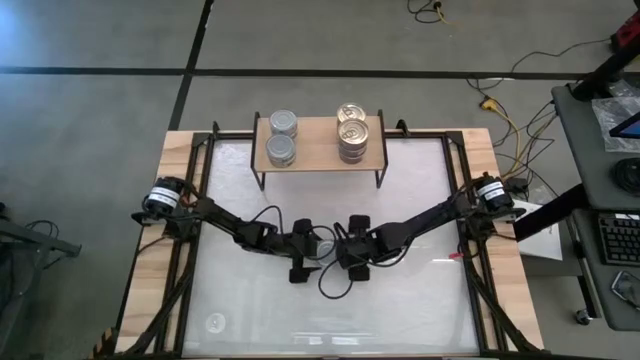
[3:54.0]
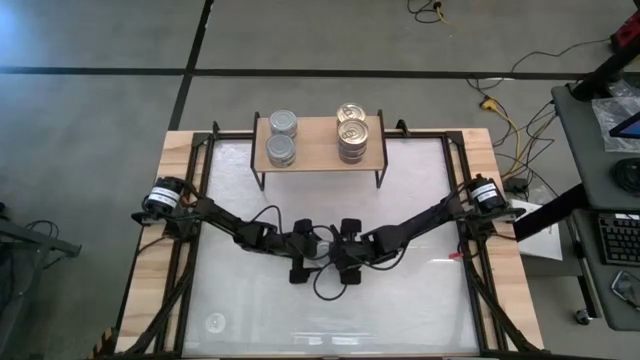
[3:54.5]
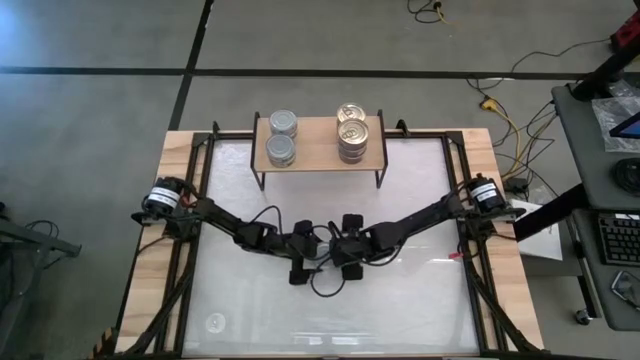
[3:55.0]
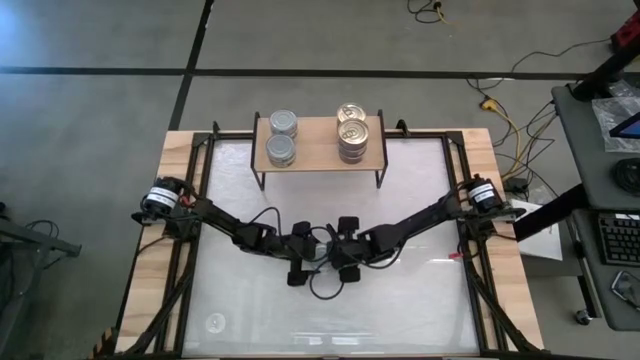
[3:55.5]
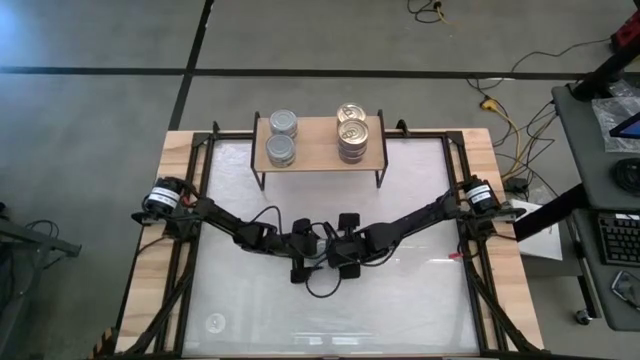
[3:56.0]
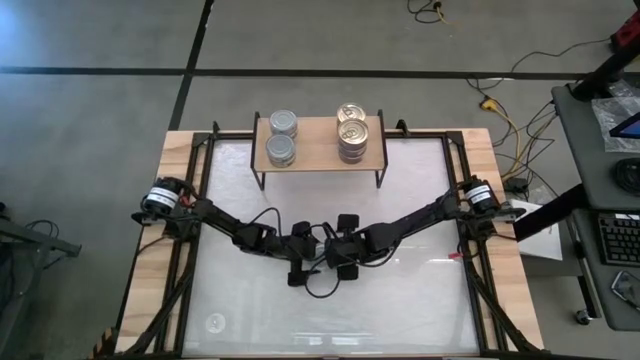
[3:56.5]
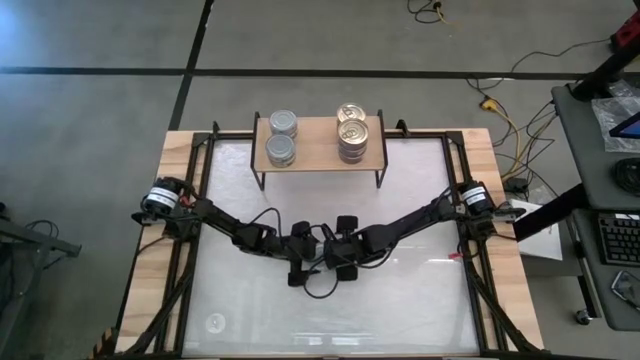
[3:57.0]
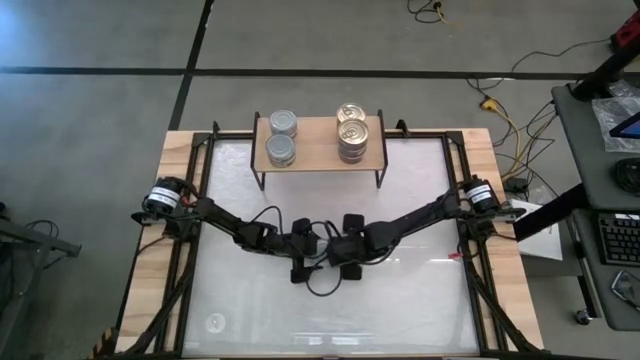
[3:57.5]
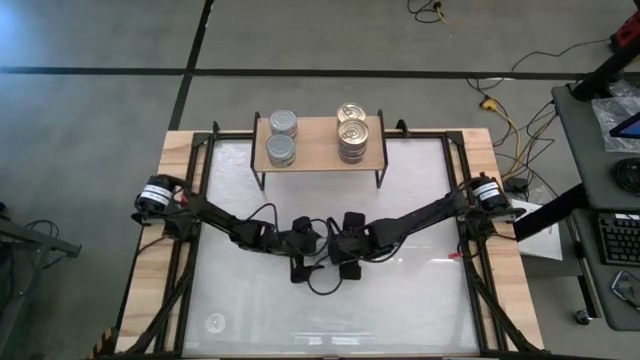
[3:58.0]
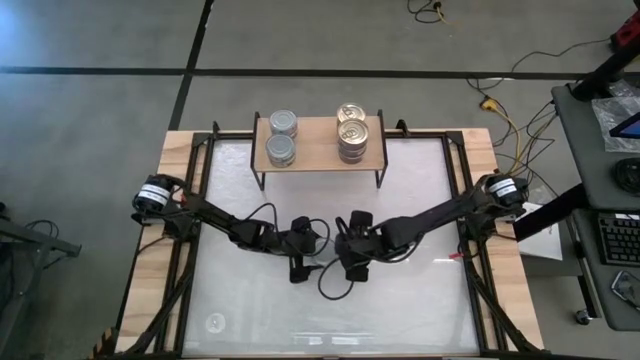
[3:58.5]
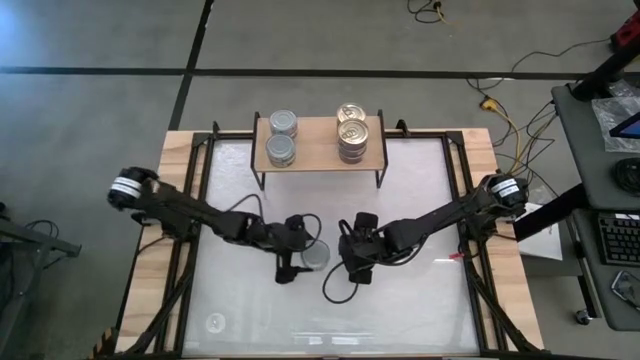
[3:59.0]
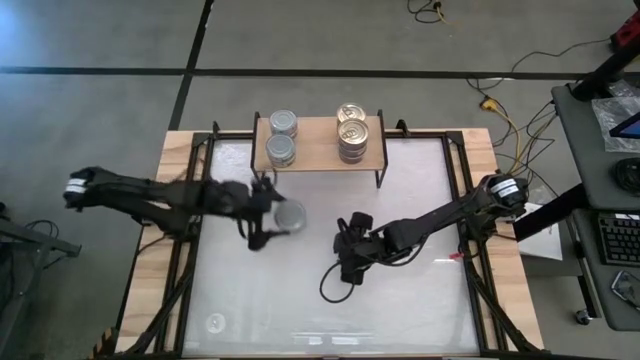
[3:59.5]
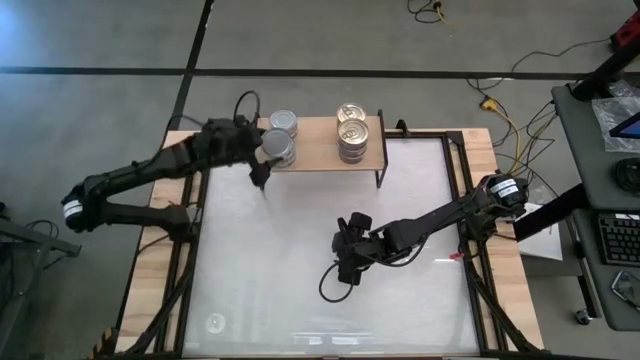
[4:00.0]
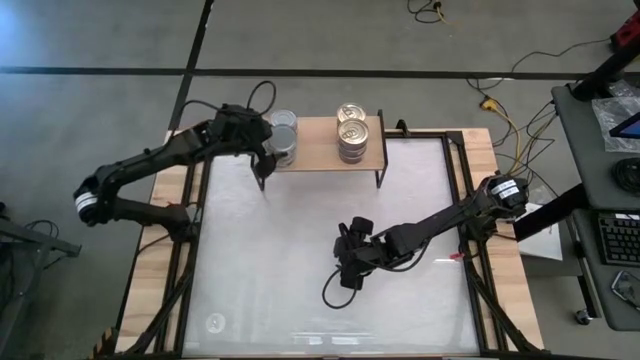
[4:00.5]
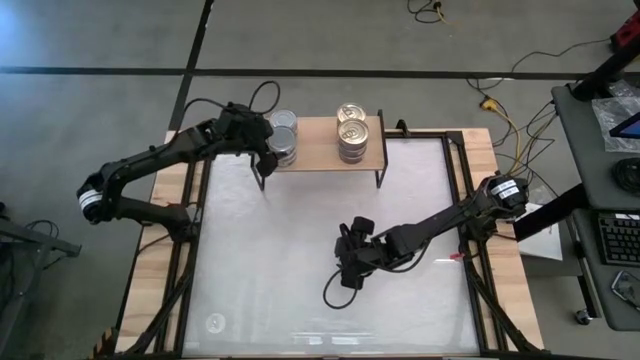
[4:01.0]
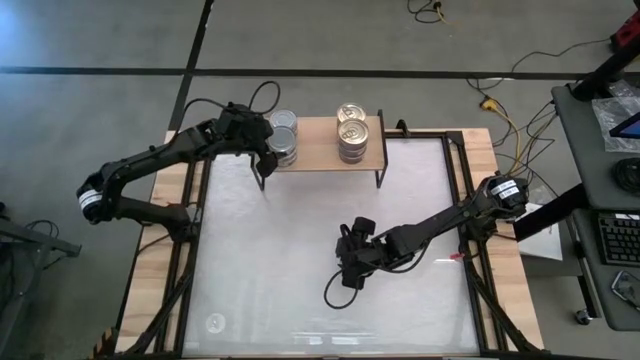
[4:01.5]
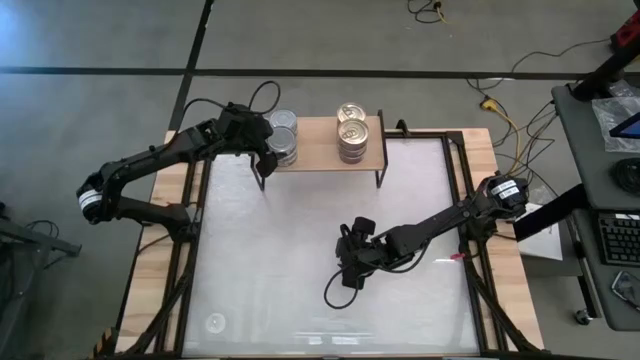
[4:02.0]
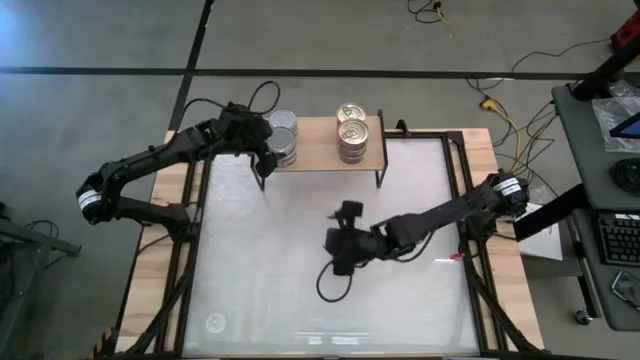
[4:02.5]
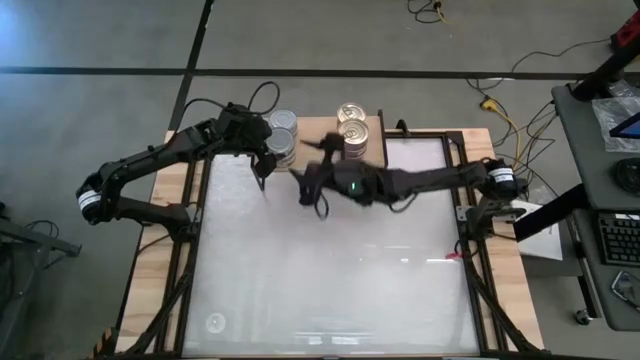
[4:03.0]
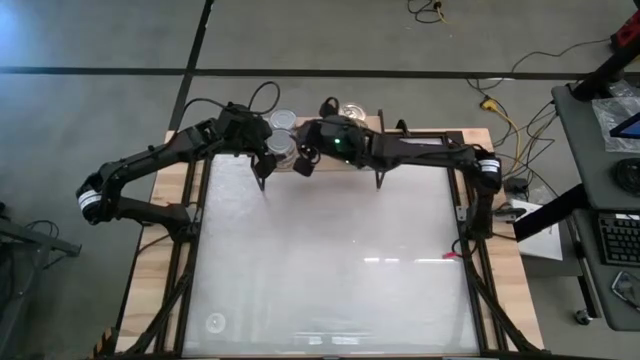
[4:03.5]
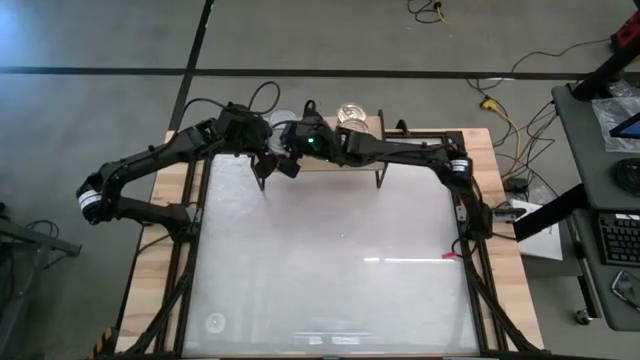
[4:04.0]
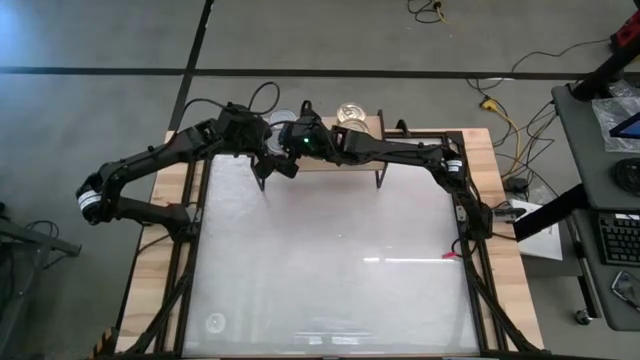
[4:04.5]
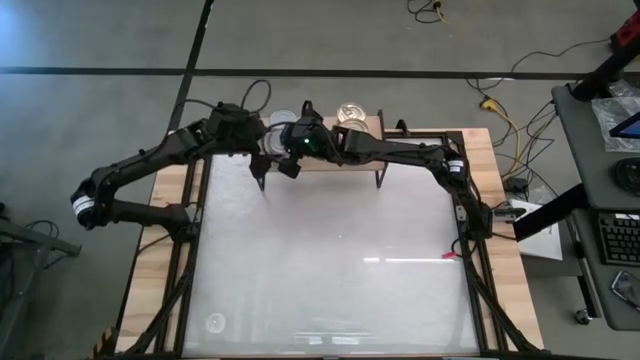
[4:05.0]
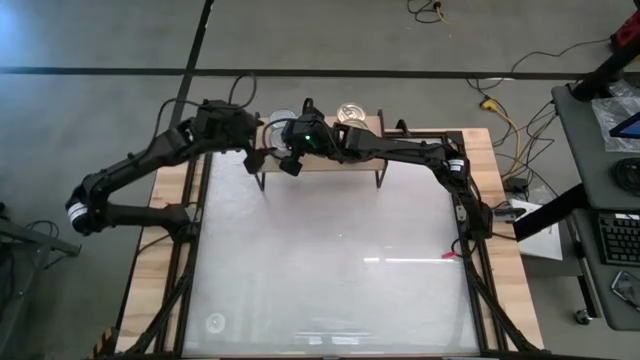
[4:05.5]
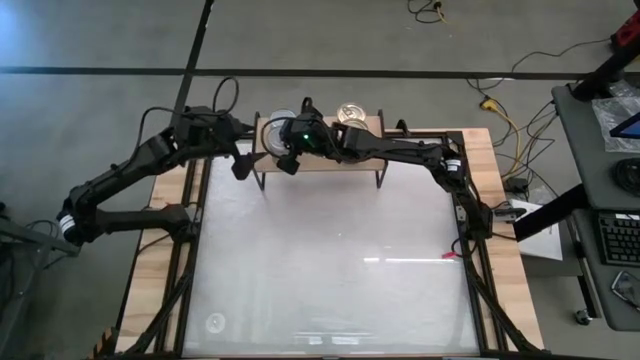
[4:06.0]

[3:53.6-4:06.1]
Task: Stack canned seafood by type on shelf
Stack the green tuna can on top of the other green tuna can

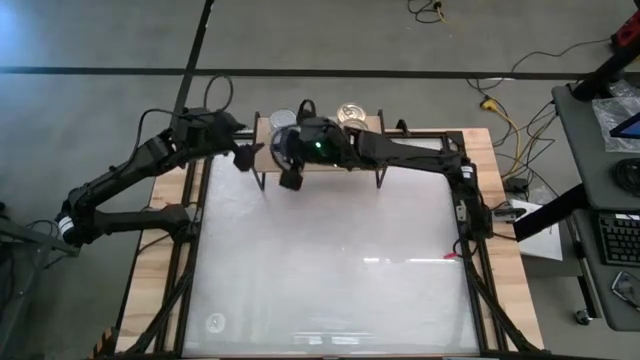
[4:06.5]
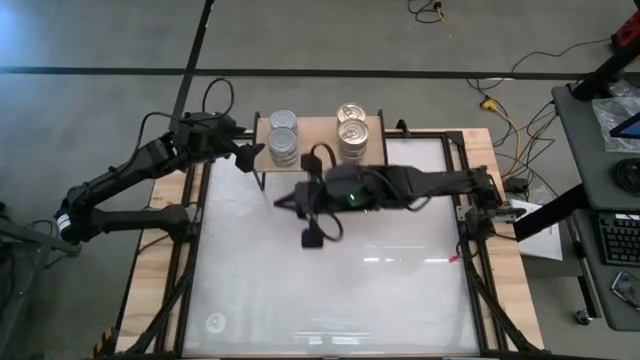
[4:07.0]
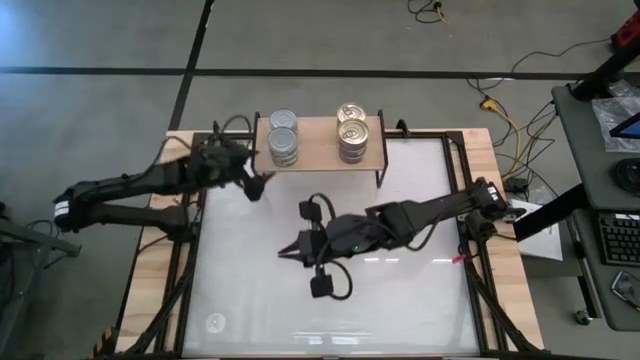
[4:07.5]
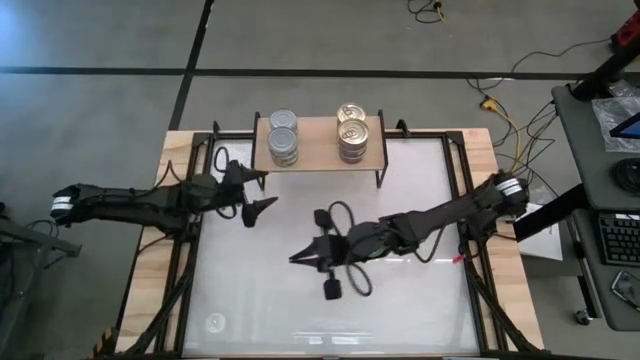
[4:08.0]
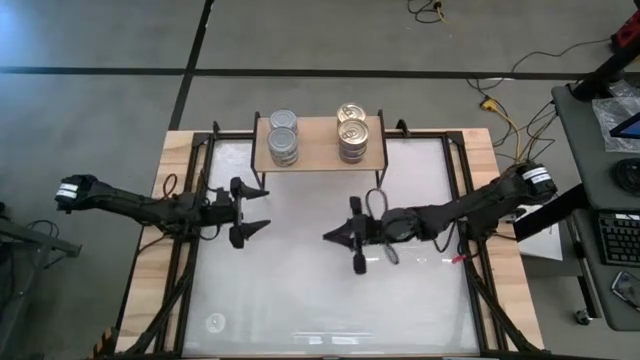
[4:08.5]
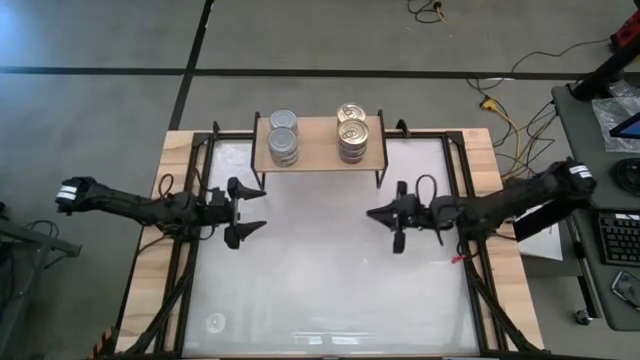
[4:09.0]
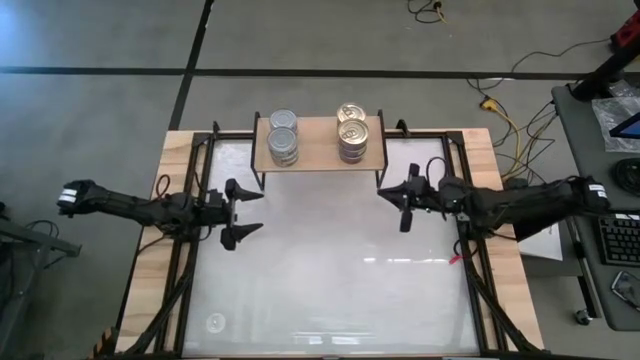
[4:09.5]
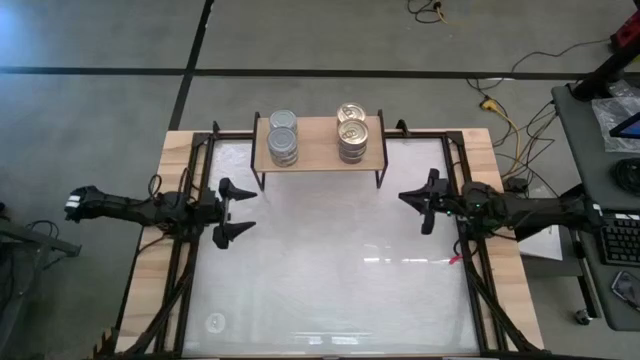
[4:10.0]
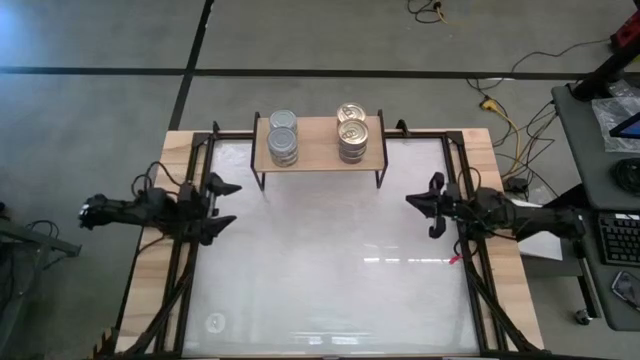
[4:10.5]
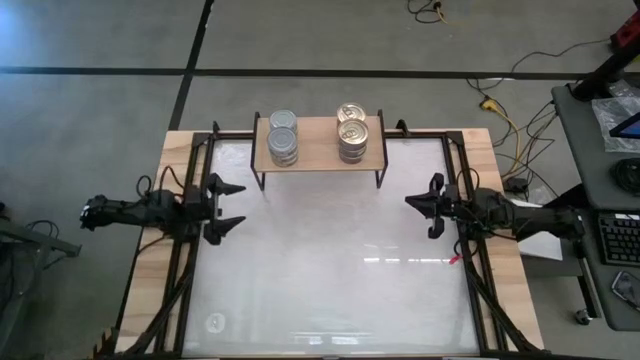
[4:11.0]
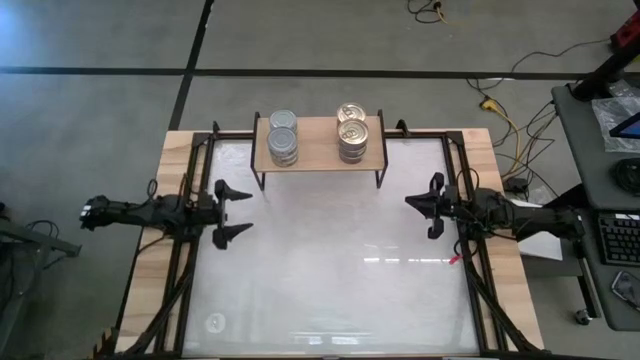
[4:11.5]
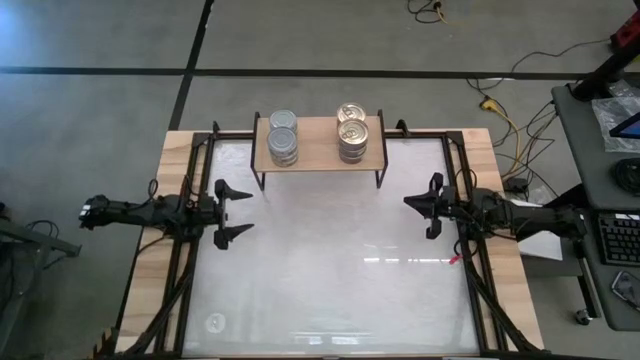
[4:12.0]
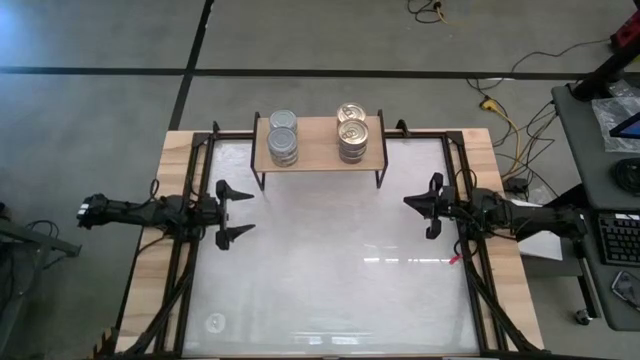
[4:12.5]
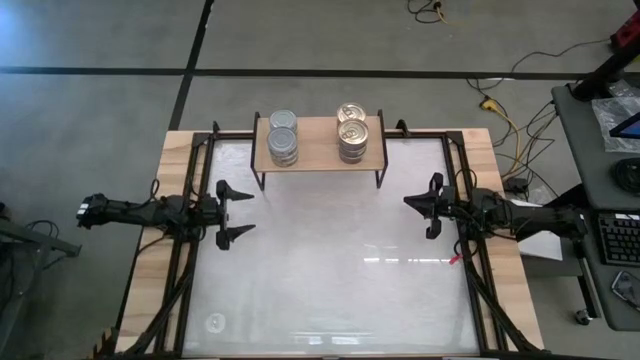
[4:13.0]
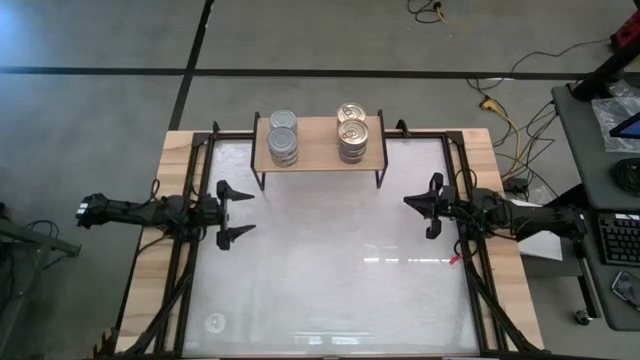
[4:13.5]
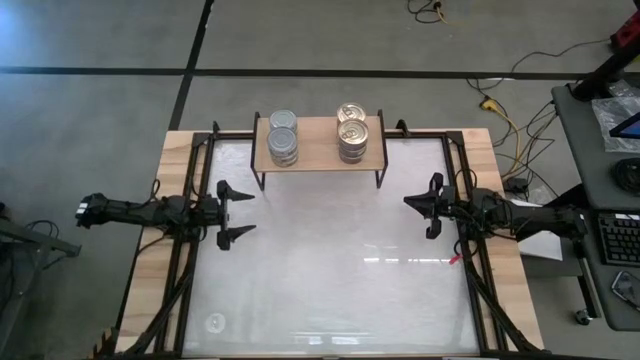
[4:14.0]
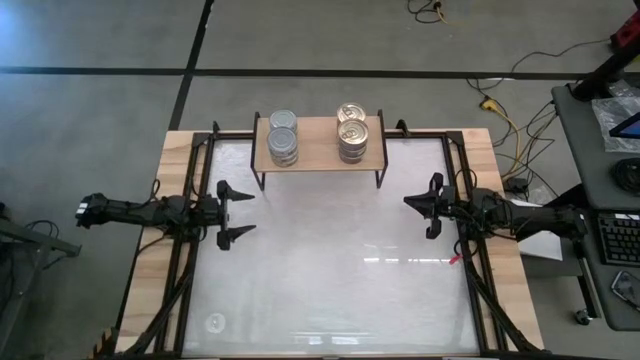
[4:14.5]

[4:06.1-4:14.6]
Return to Home Position

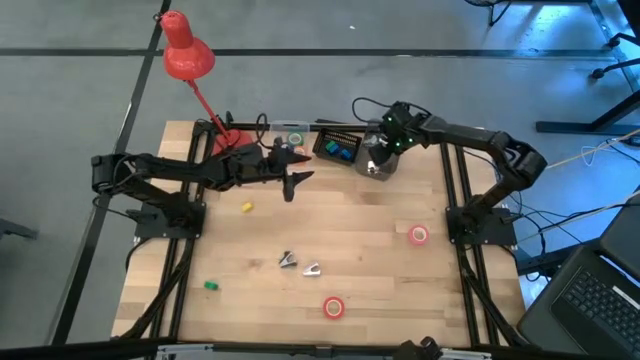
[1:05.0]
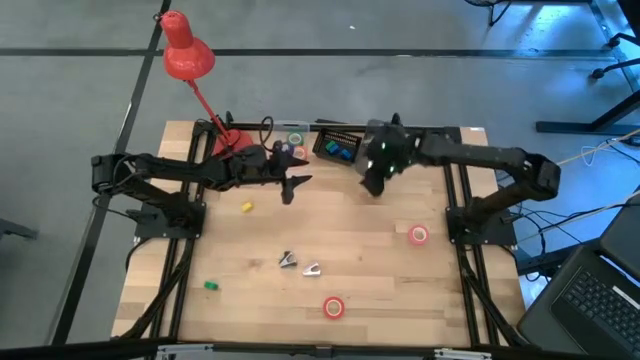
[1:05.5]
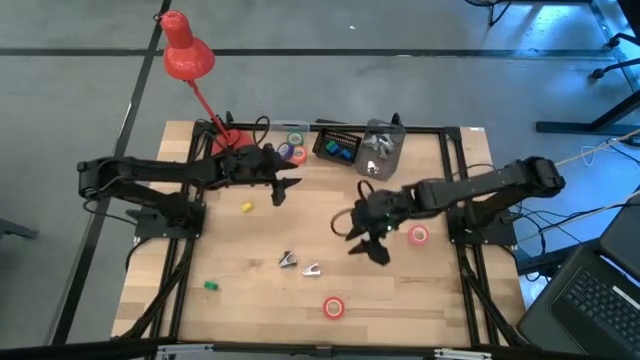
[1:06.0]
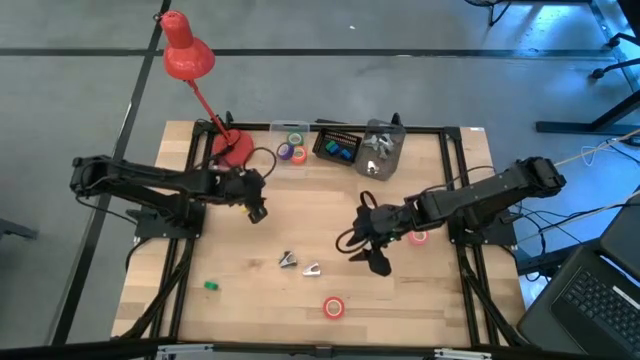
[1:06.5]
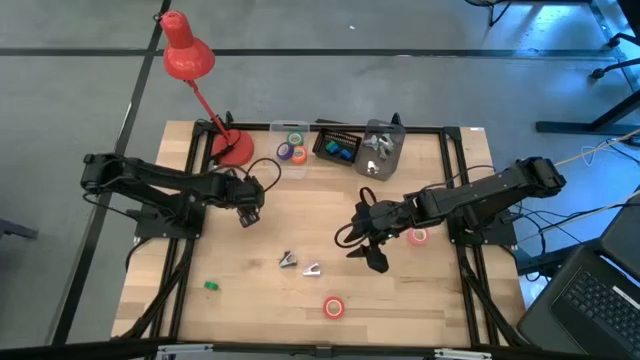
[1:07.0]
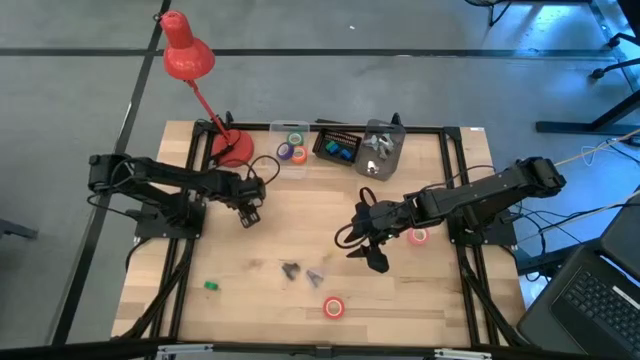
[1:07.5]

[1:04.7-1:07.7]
Task: Pick and place Stapler, Stapler remover, tape
Put the yellow stapler into the left black bin
